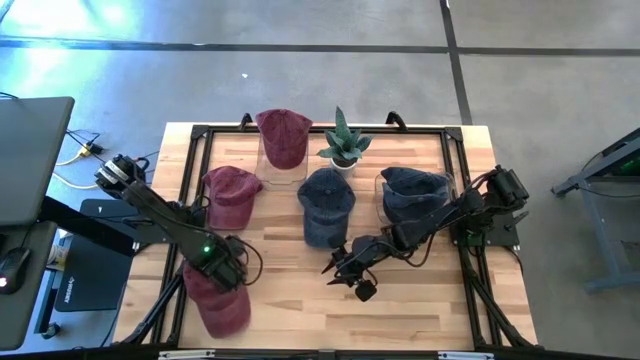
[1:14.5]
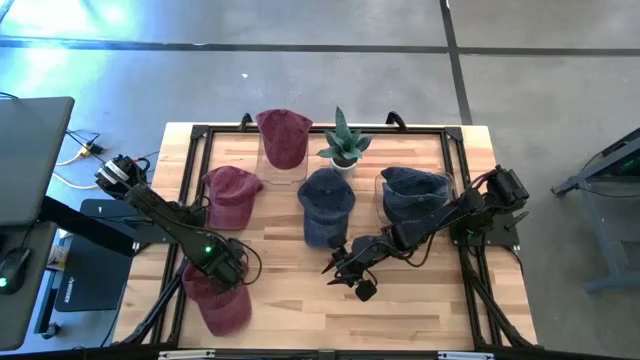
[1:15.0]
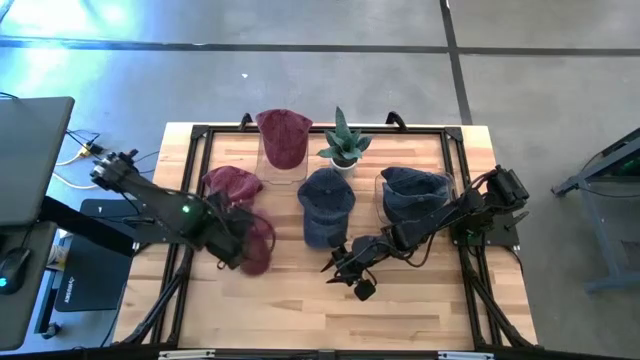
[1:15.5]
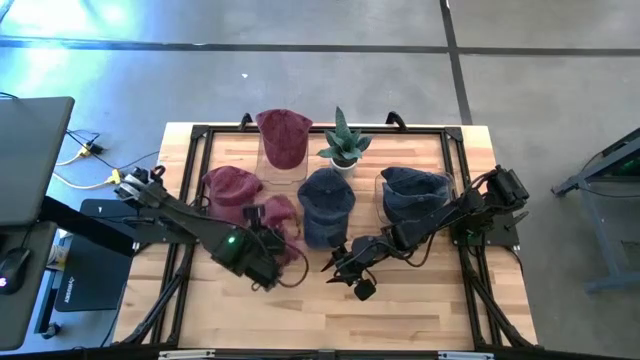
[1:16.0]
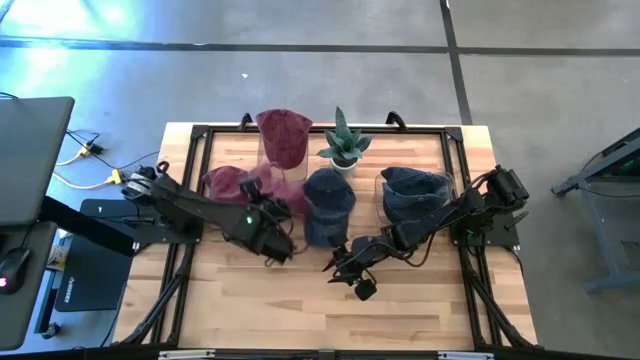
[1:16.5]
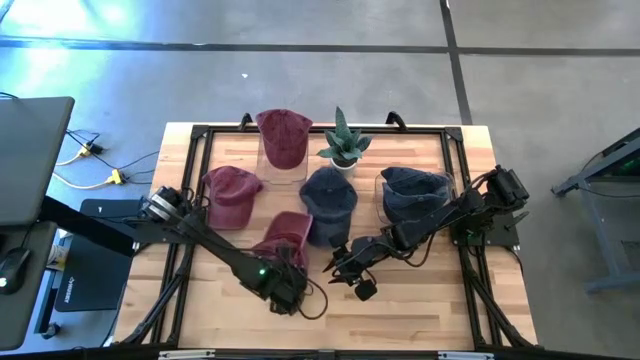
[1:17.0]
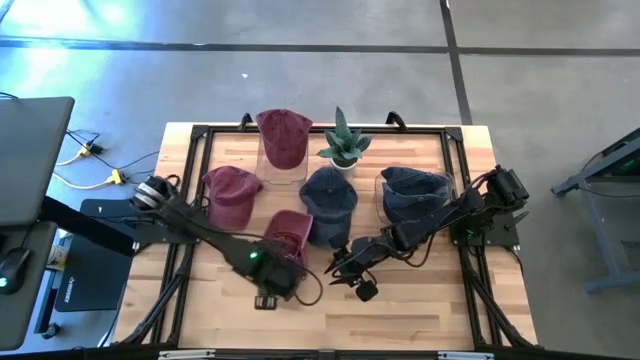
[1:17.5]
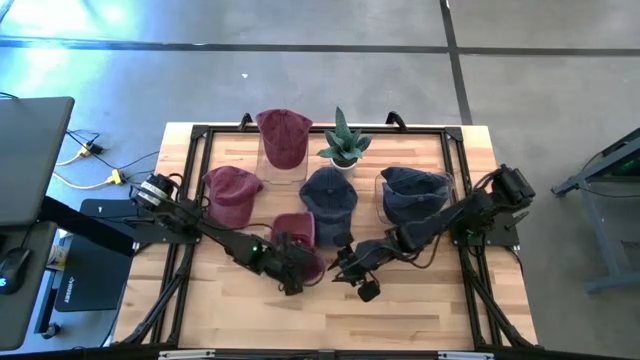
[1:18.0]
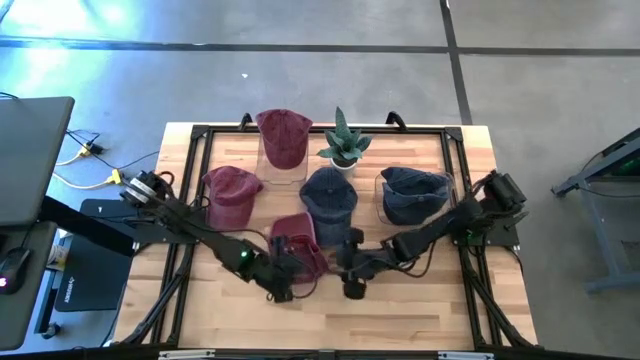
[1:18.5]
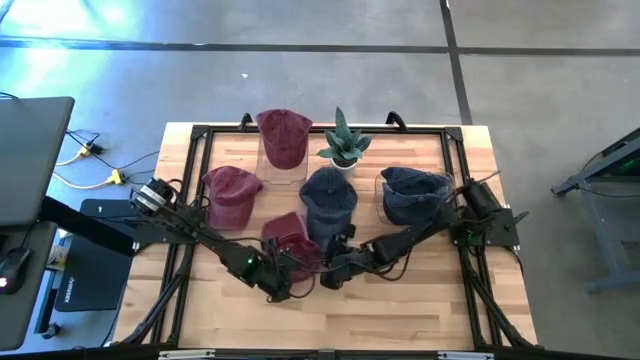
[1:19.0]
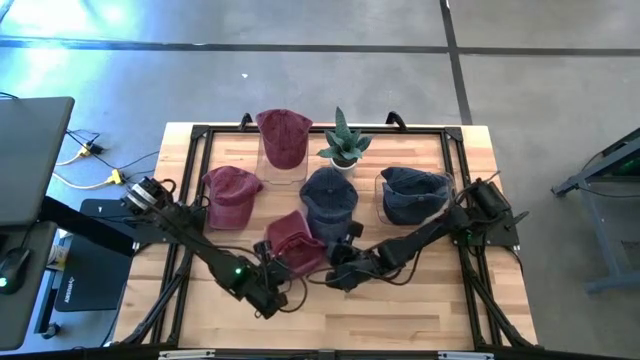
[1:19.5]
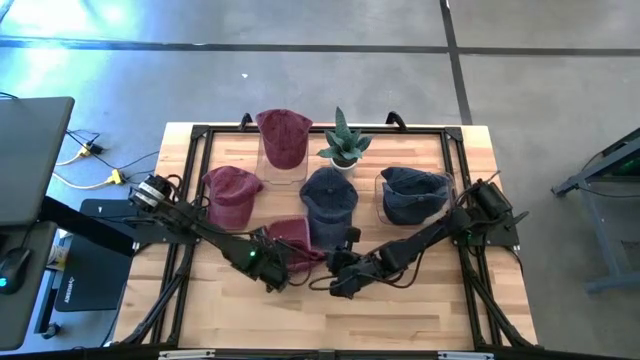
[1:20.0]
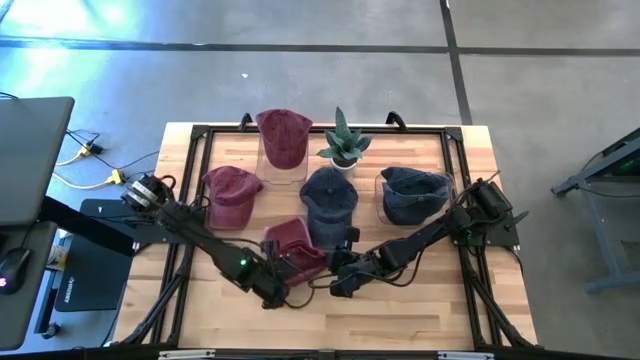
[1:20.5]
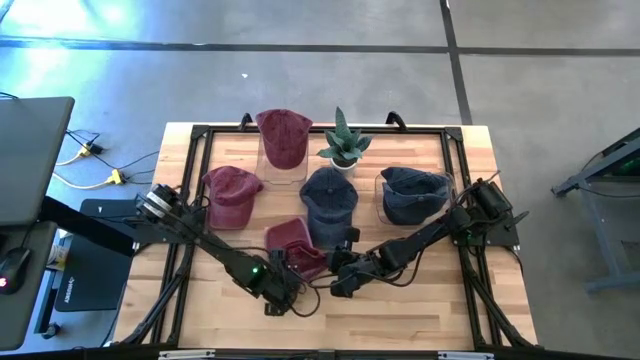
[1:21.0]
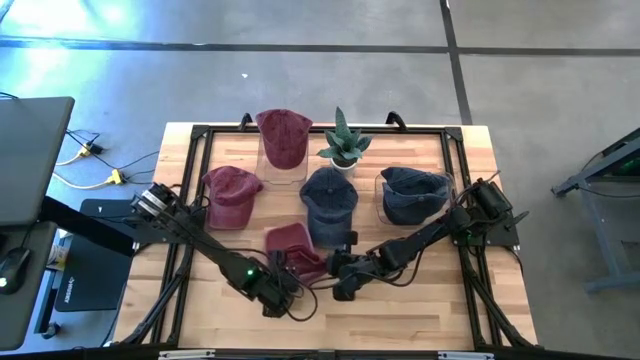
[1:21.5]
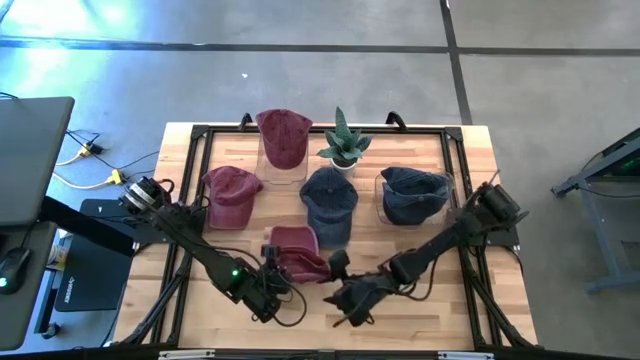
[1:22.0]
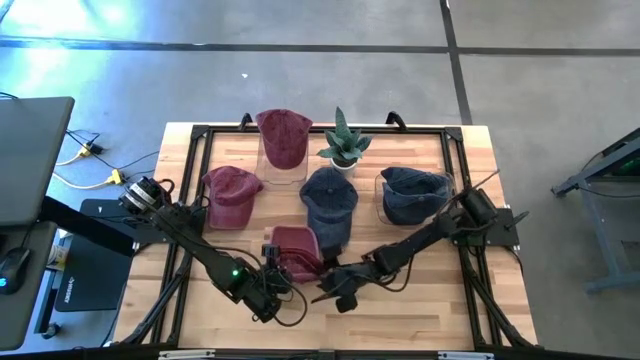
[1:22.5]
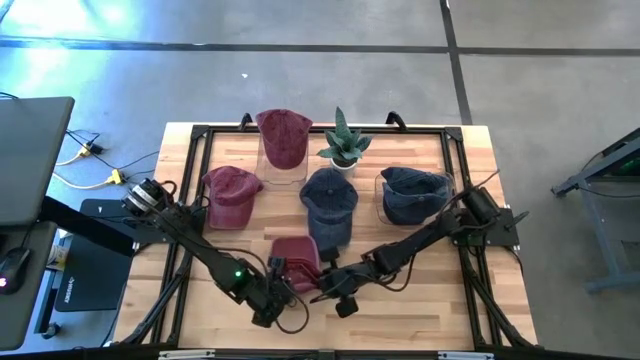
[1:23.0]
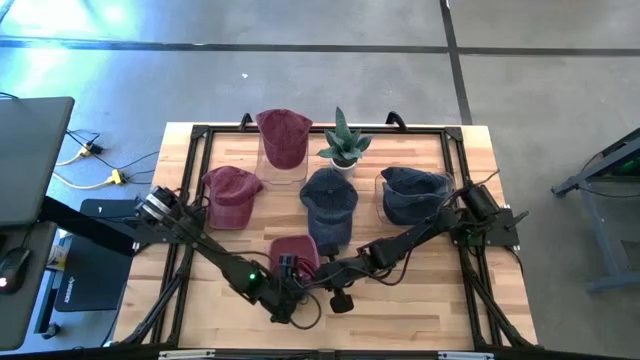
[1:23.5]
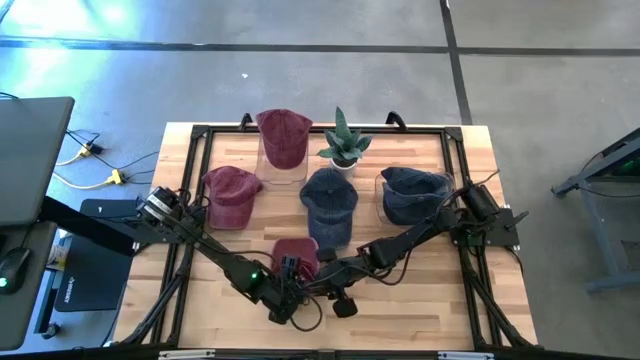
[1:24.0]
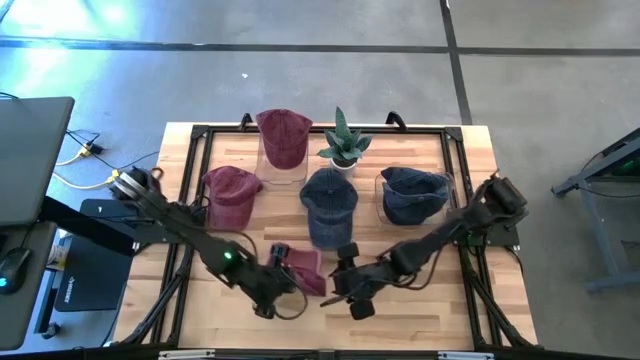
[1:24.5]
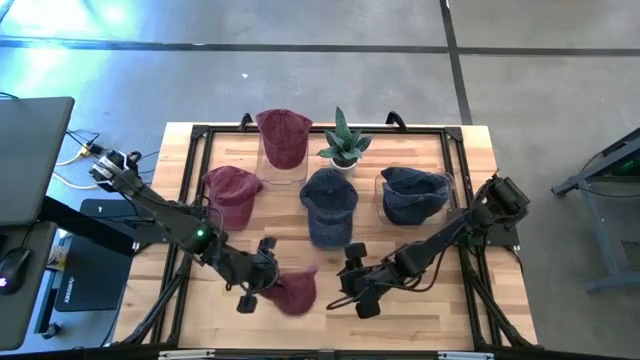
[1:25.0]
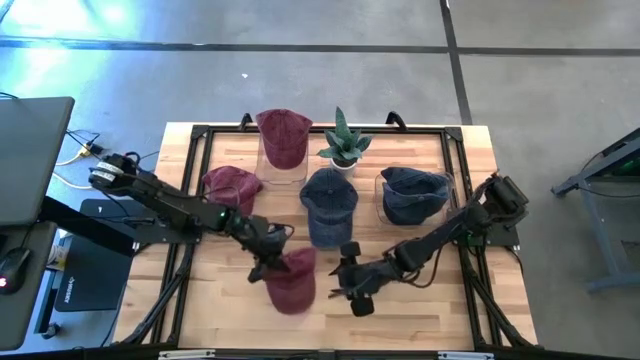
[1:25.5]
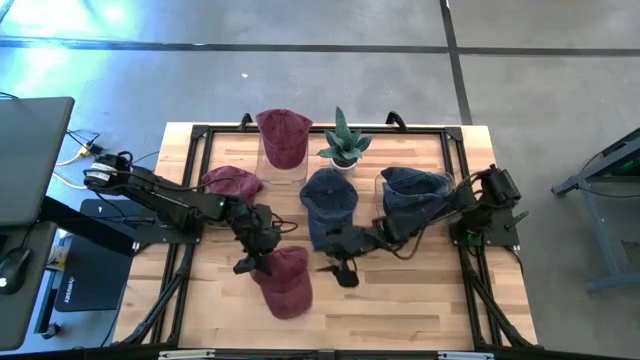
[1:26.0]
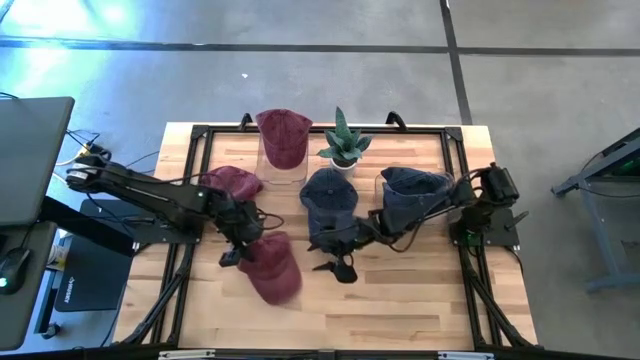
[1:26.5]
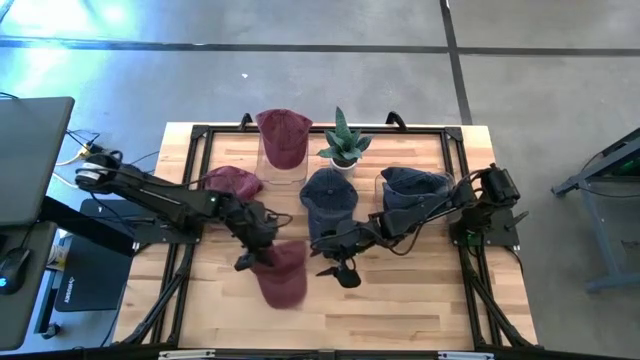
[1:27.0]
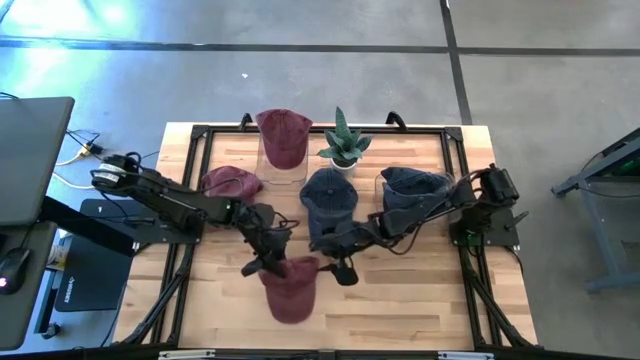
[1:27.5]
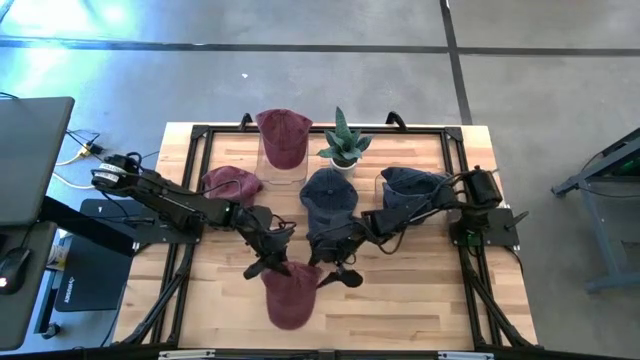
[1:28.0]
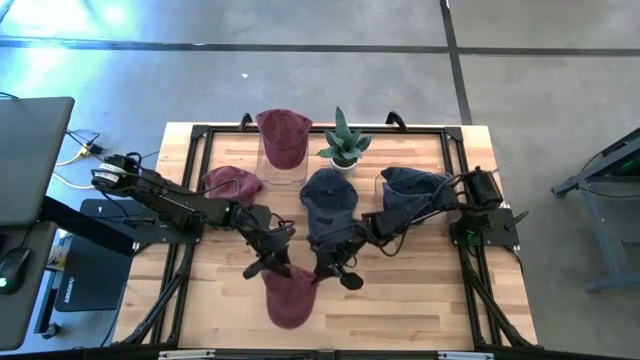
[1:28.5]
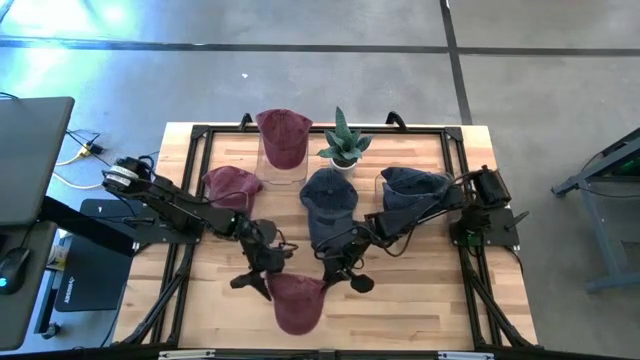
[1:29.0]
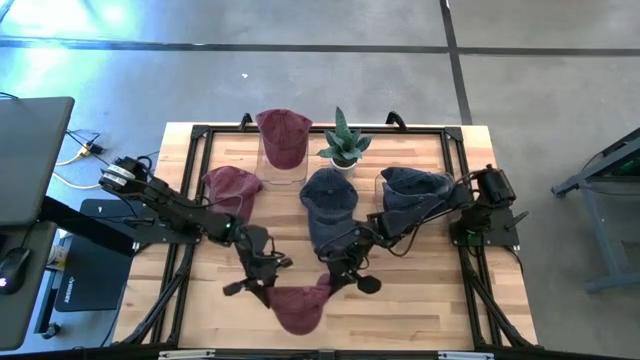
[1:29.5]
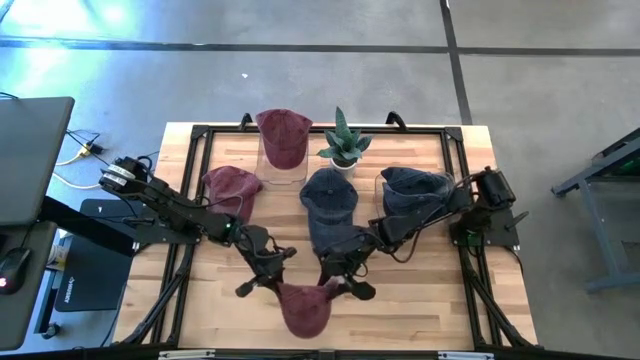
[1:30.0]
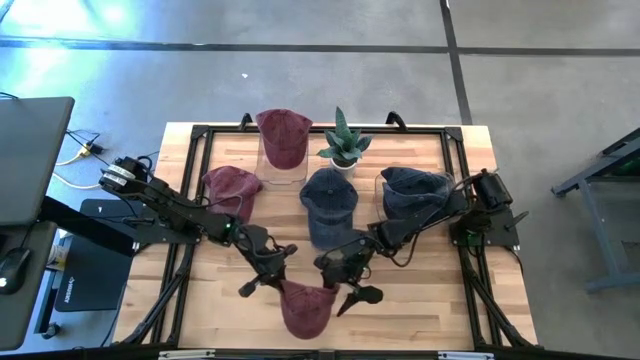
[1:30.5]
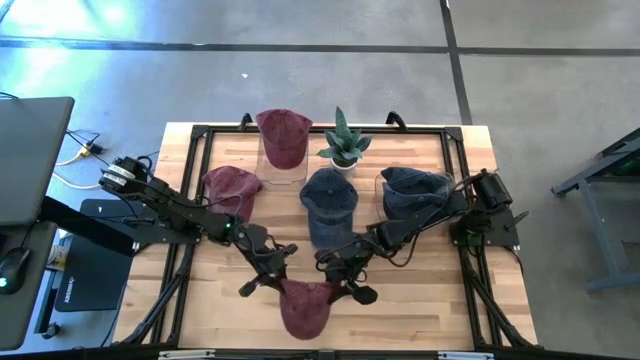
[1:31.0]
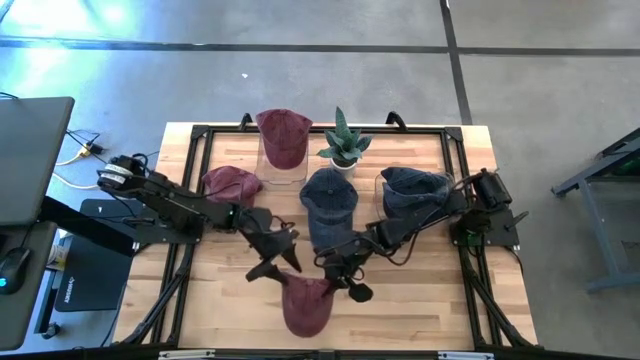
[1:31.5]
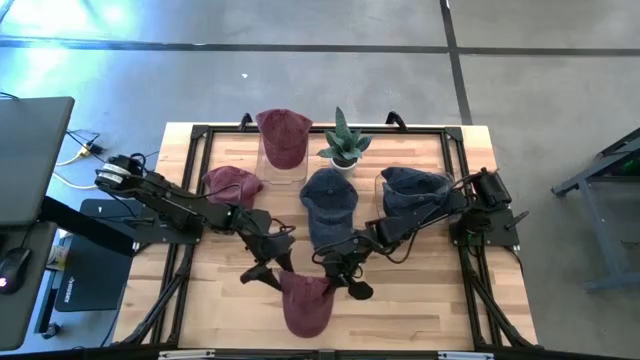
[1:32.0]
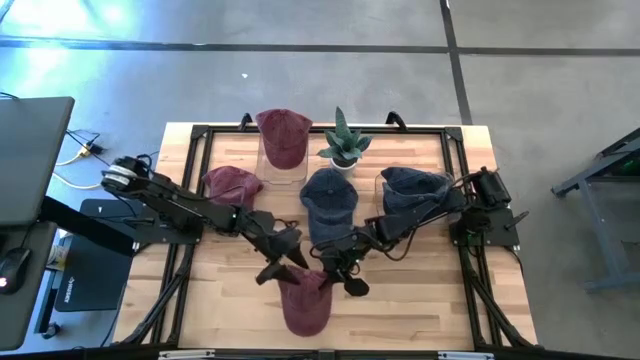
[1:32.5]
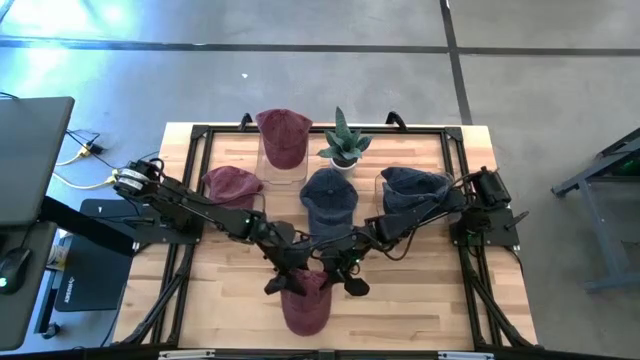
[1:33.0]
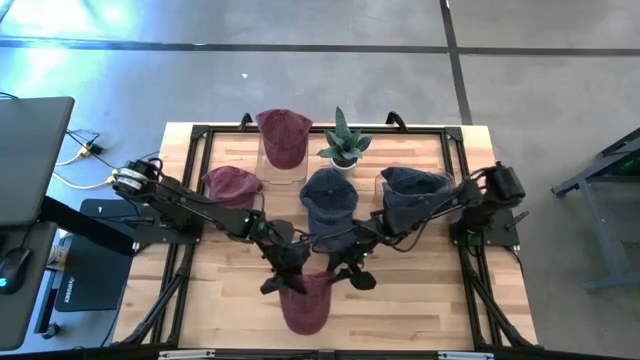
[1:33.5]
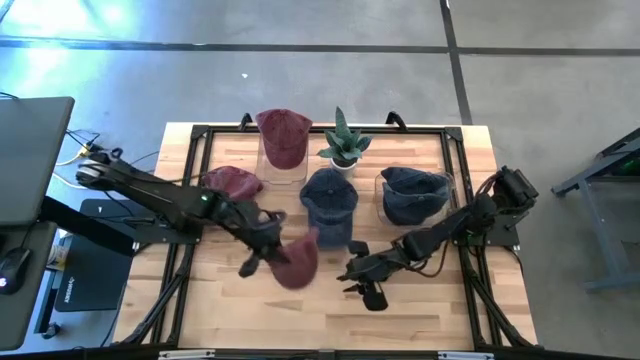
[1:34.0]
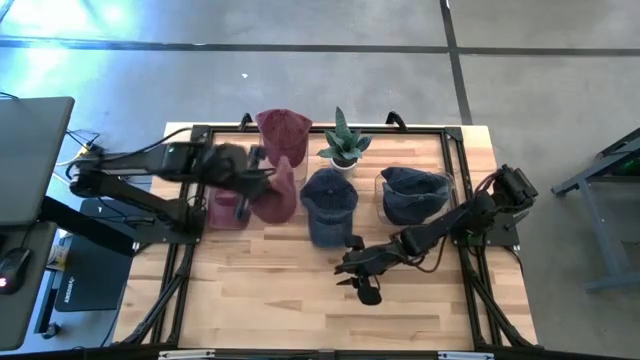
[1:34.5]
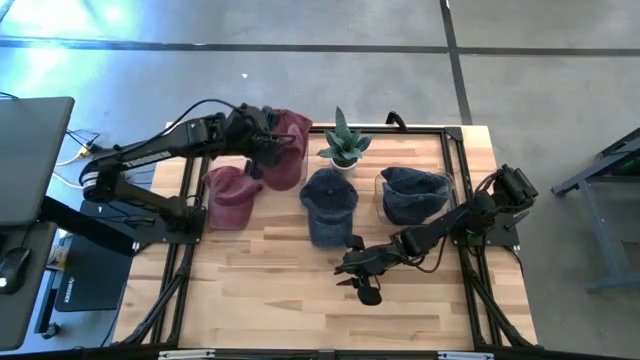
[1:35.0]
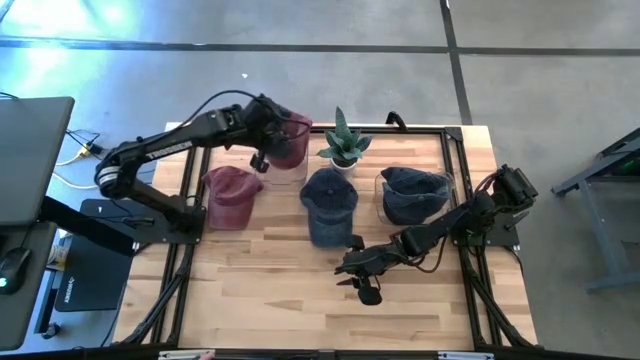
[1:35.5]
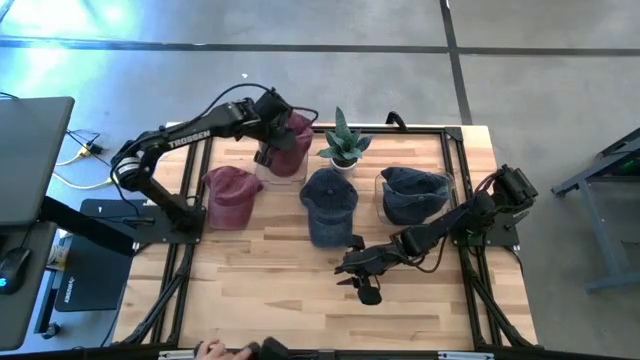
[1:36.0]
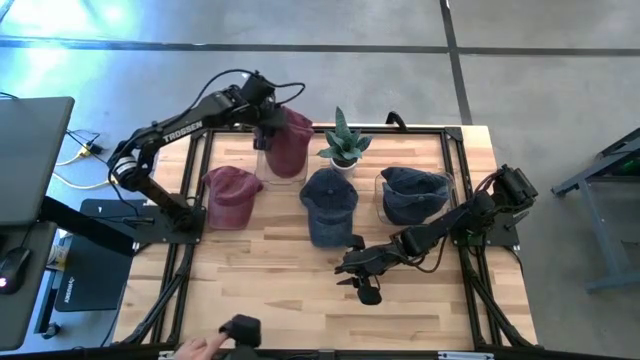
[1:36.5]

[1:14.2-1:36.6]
Task: Pick & Place hat
Put the bottom red cap into the left transparent bin
